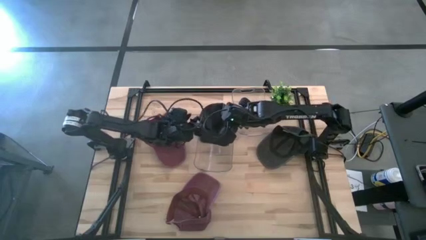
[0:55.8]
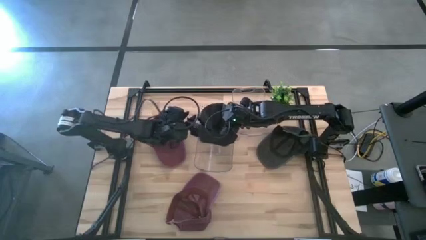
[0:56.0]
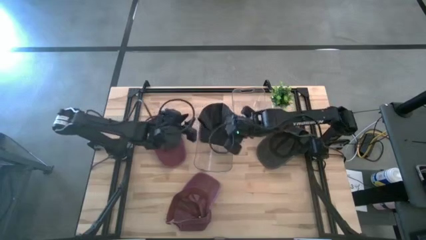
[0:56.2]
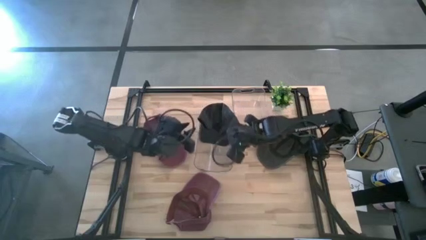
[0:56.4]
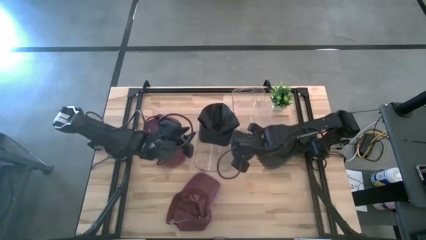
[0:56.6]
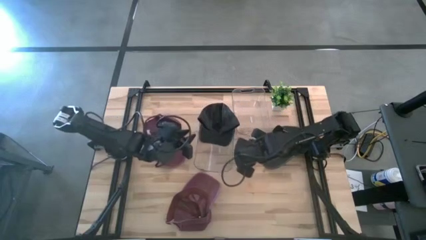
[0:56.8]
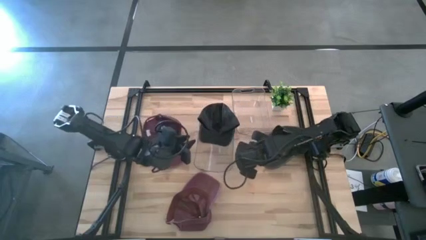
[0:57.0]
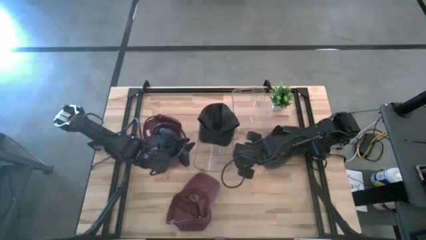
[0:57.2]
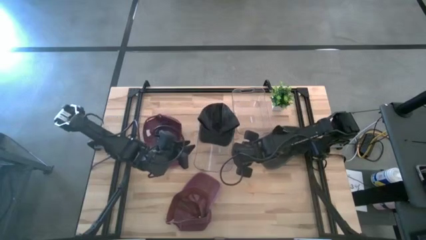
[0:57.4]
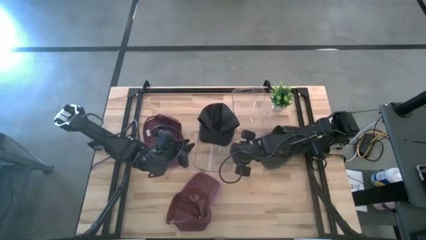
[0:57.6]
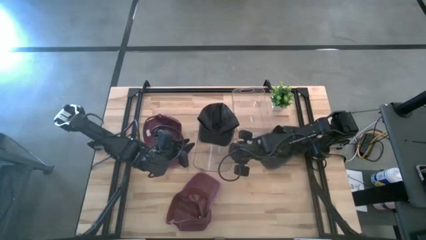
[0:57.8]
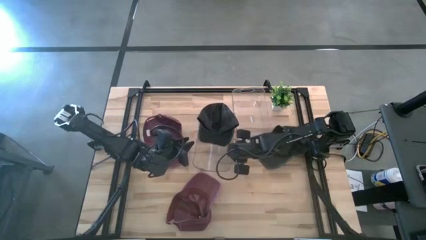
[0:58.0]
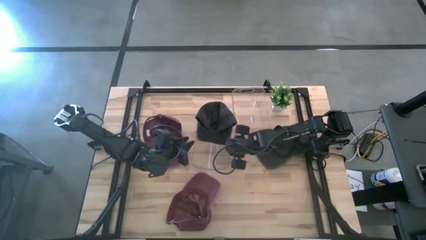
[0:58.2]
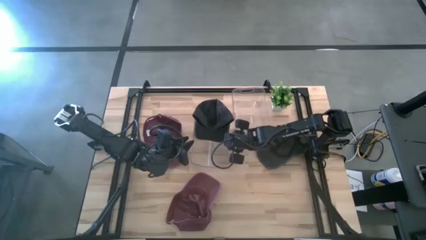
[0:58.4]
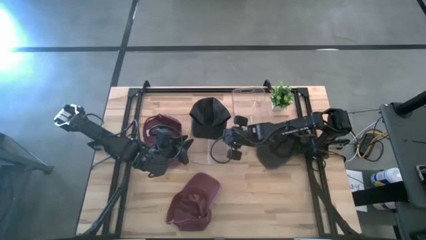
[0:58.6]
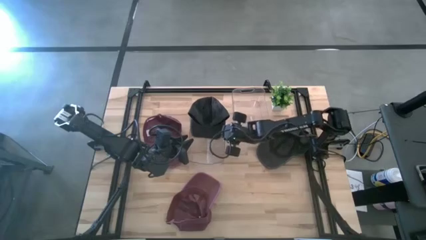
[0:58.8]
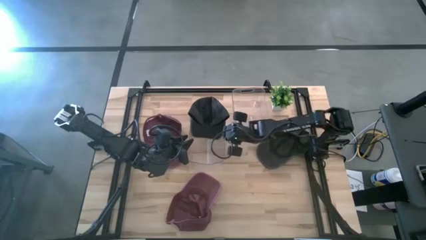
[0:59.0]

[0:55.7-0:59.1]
Task: Pick & Place hat
Adjust the left transparent bin

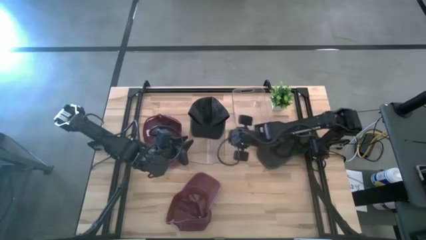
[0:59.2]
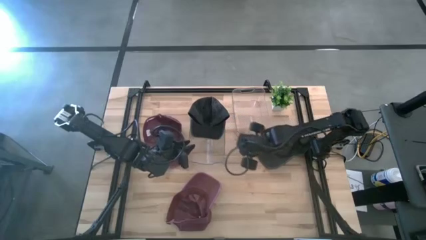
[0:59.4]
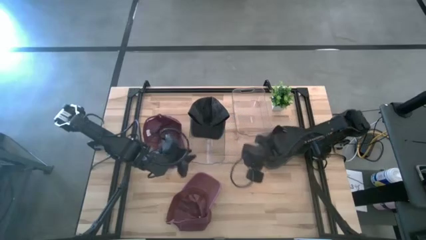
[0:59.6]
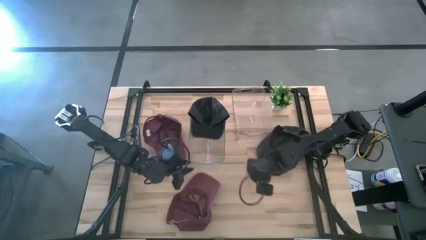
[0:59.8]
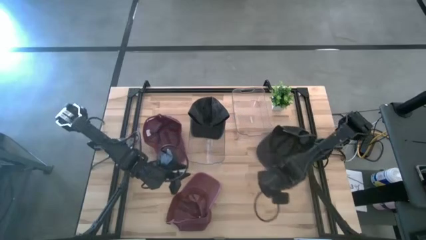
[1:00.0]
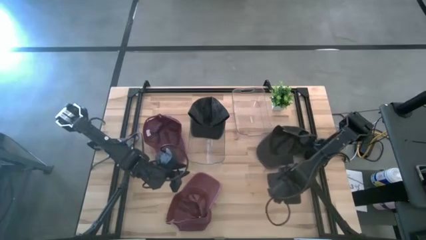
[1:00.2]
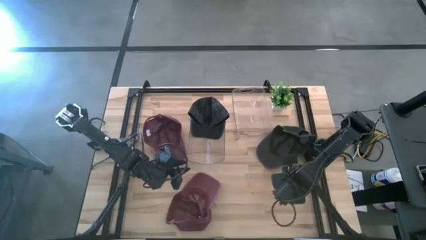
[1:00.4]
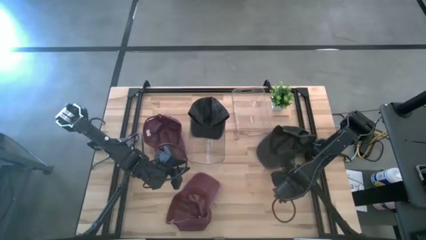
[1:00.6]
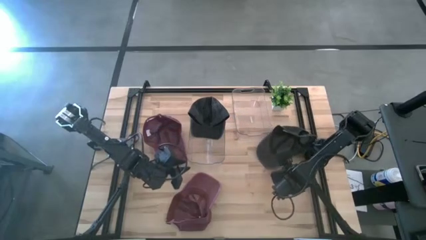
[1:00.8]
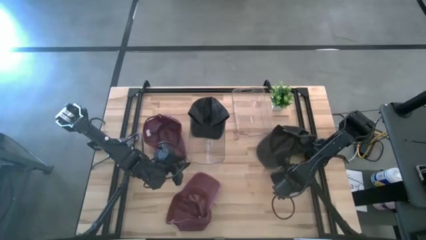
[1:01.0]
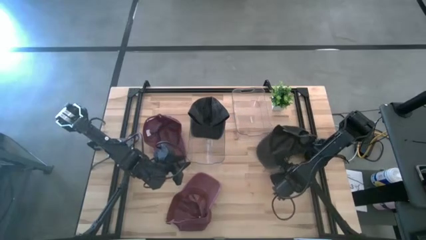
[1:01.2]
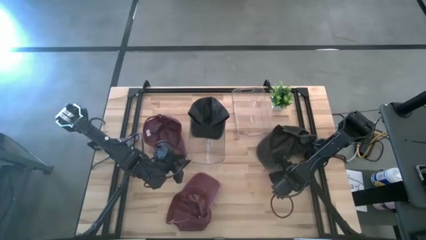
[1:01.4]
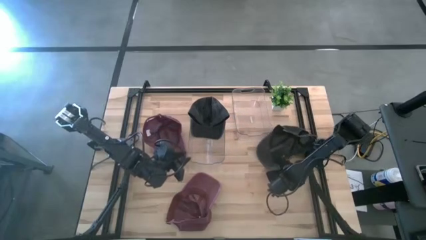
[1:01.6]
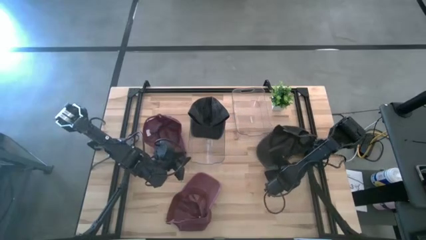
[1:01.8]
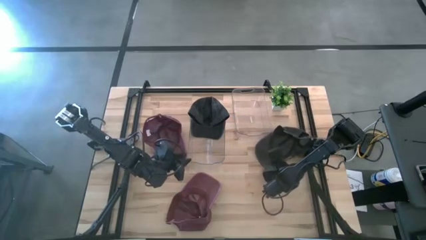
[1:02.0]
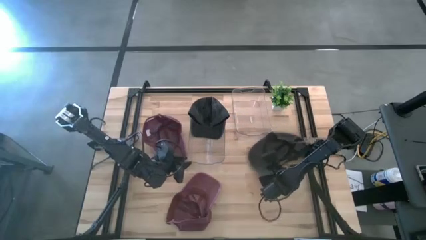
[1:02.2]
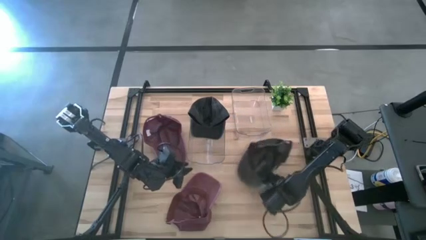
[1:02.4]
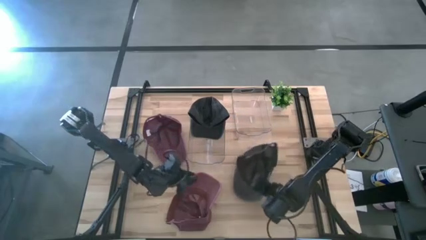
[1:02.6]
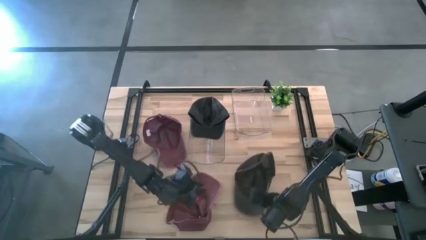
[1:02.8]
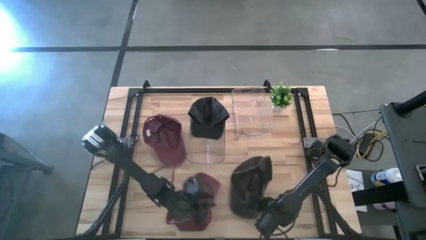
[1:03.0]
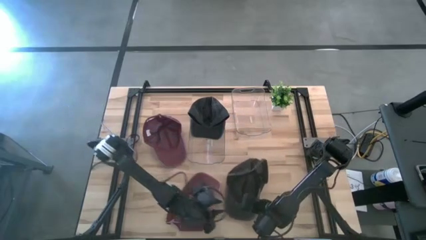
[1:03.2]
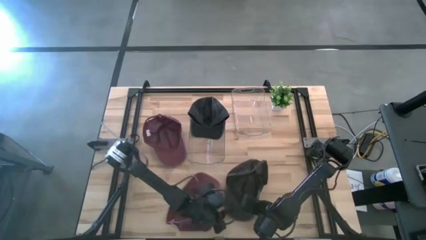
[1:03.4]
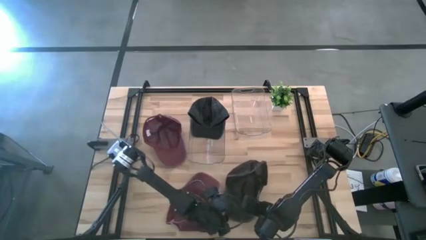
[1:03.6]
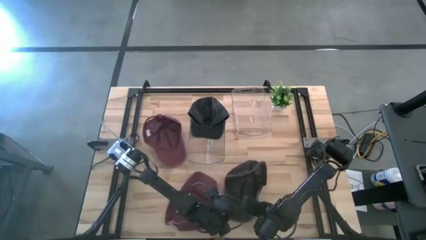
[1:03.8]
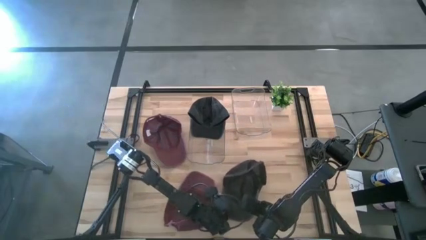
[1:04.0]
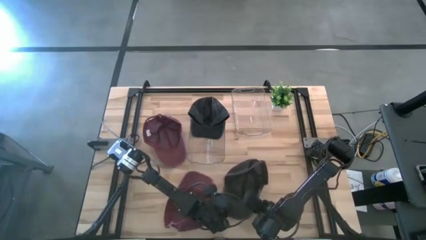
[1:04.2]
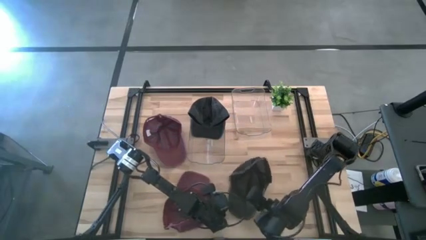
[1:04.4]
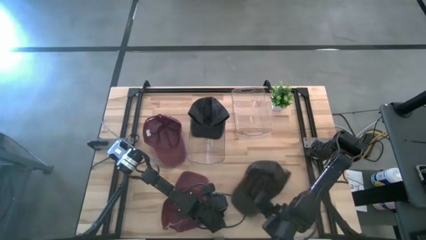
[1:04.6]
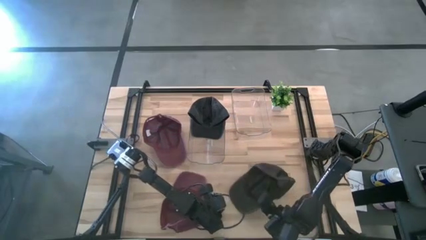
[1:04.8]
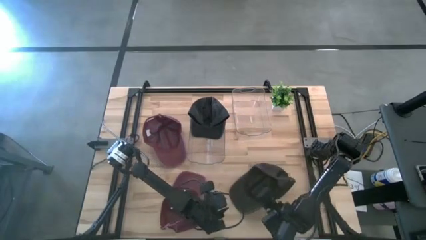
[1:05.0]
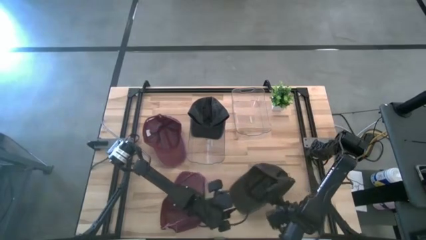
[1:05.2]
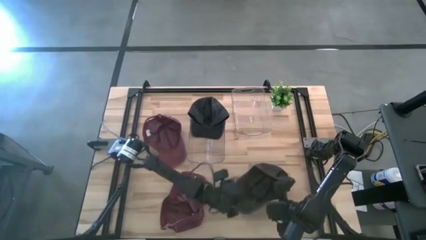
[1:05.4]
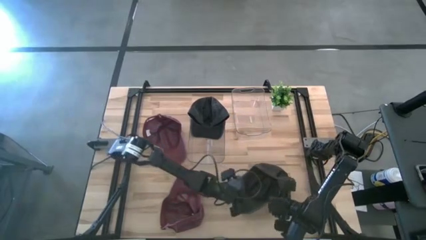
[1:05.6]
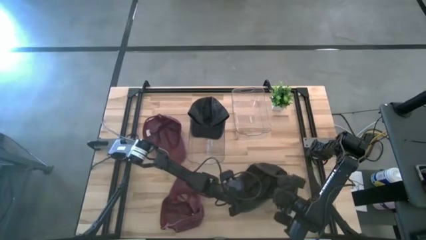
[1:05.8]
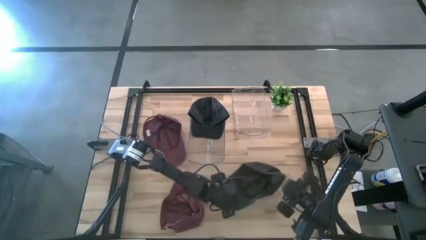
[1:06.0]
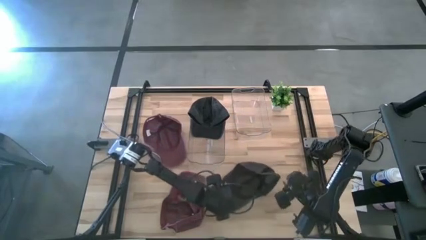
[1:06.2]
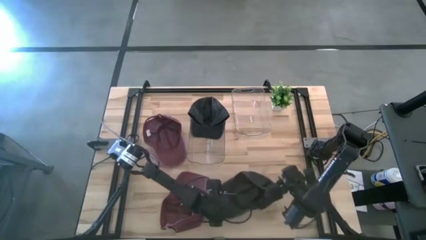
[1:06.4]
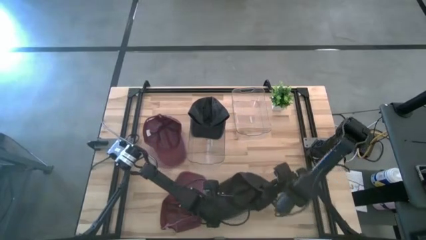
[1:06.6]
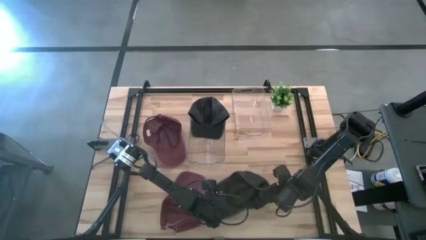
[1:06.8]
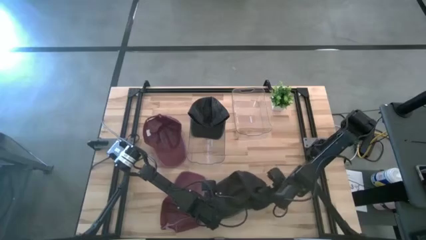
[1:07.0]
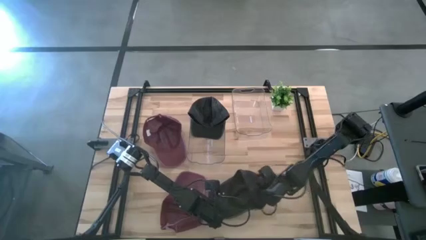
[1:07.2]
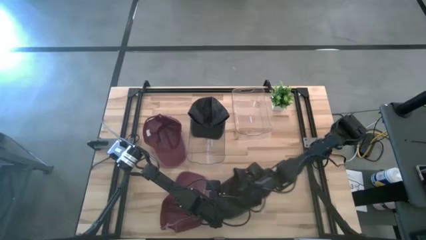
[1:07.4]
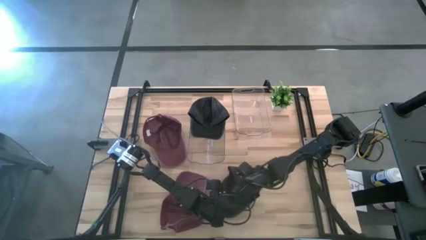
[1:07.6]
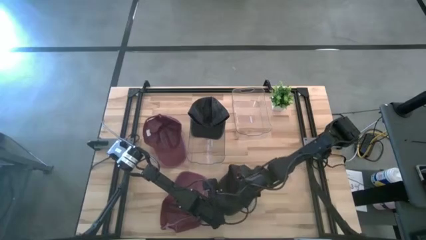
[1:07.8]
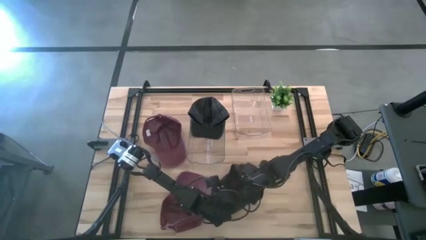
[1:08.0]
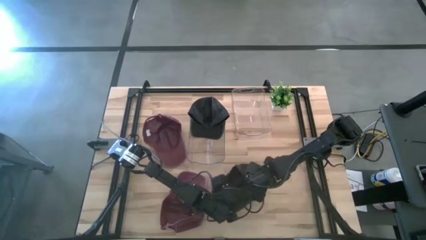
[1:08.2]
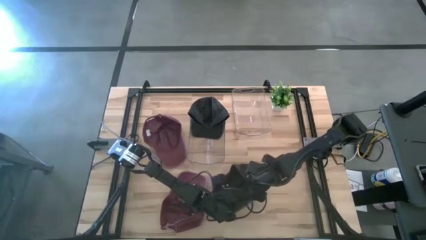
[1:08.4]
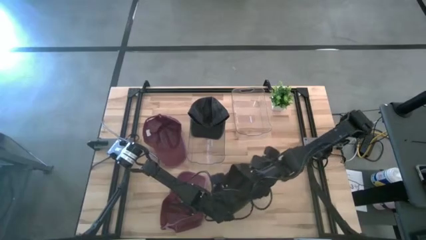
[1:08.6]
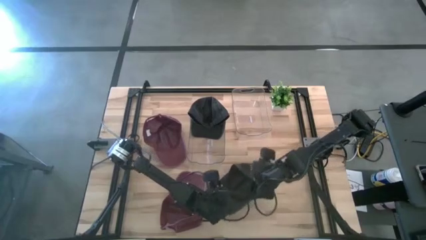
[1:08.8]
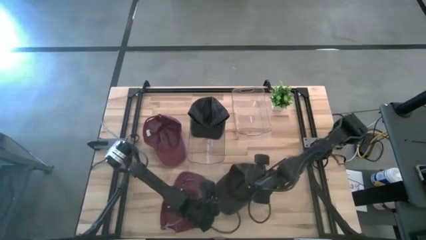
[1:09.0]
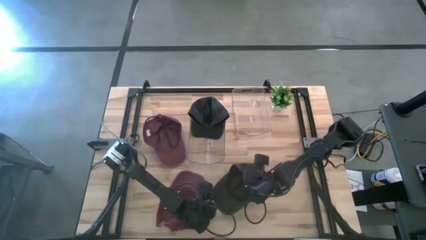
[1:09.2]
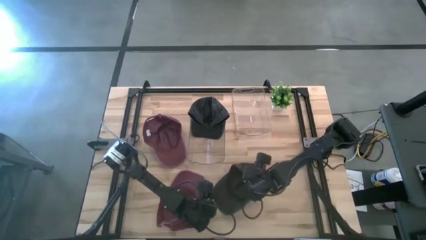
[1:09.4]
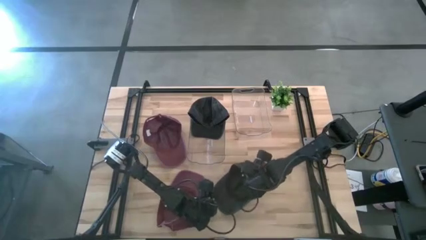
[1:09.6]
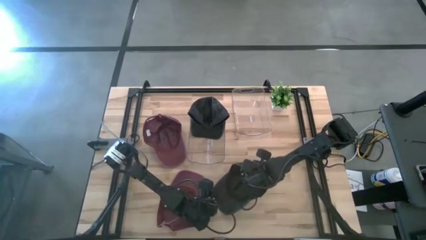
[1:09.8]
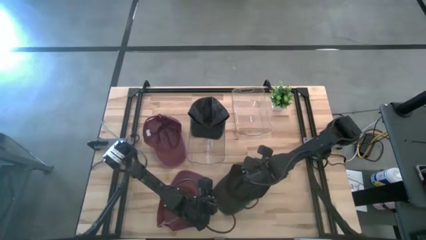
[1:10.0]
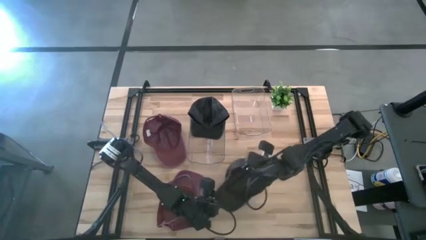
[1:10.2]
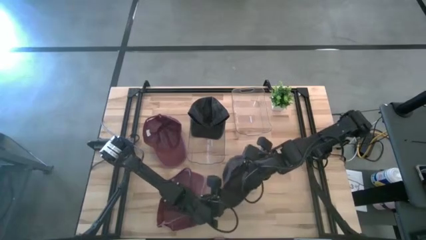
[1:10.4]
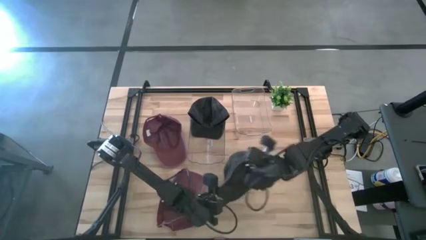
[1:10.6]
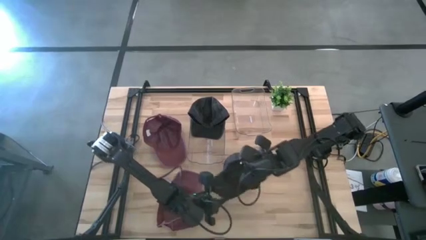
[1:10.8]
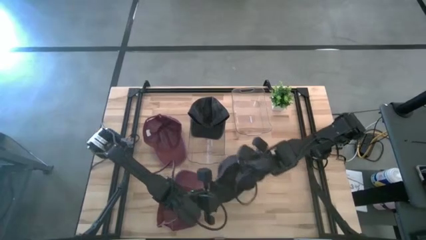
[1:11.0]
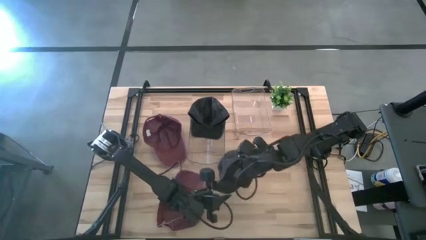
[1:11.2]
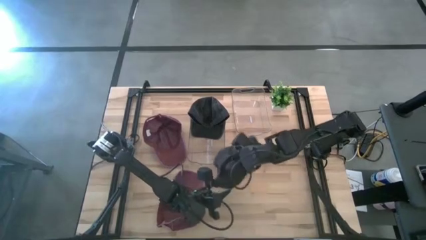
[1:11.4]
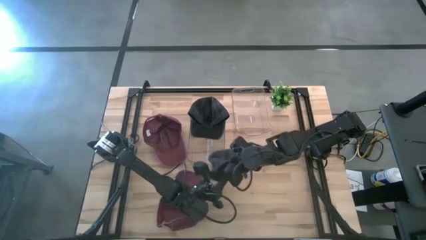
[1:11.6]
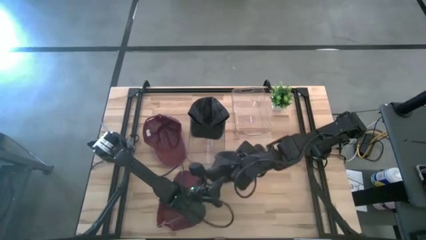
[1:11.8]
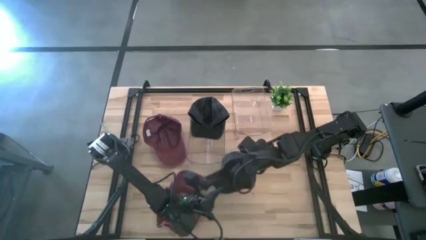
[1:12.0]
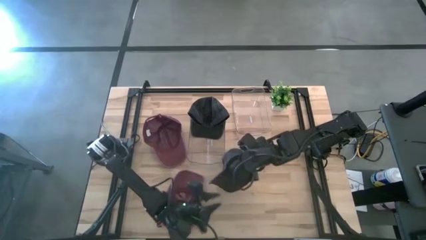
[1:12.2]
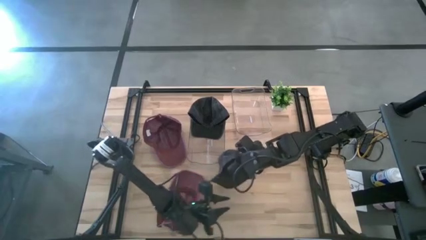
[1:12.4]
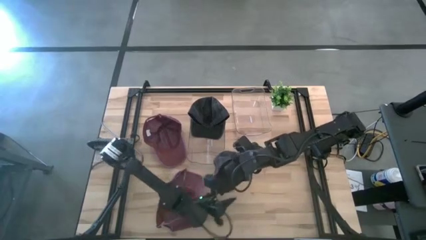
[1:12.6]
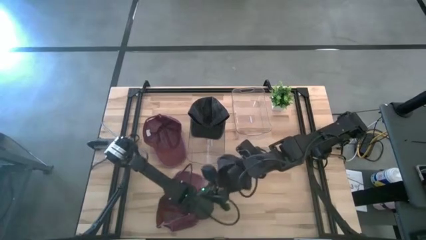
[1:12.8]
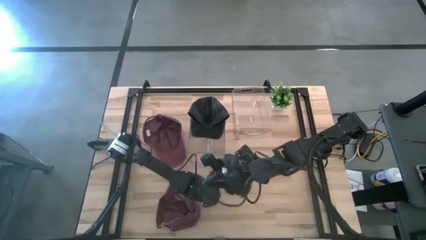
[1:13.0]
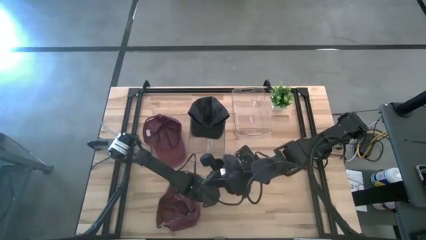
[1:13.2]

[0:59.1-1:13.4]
Put the black cap into the left transparent bin
